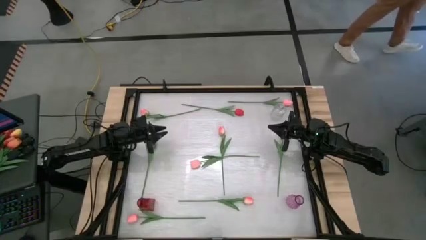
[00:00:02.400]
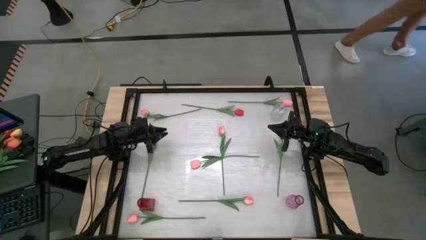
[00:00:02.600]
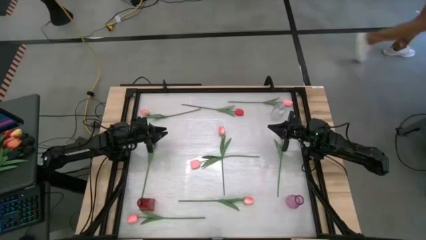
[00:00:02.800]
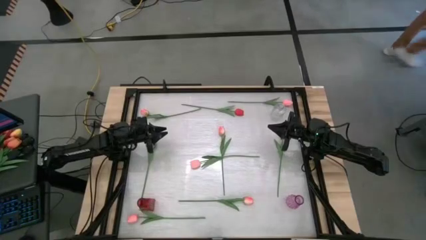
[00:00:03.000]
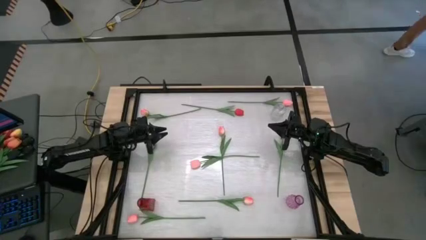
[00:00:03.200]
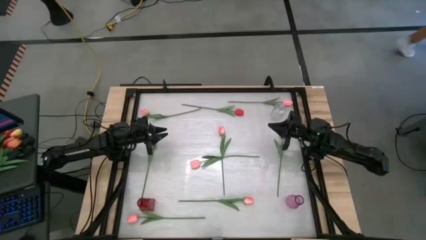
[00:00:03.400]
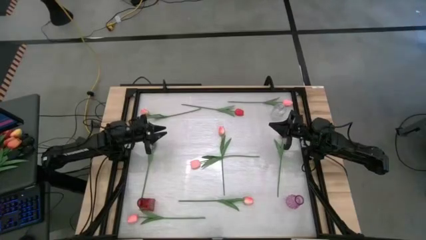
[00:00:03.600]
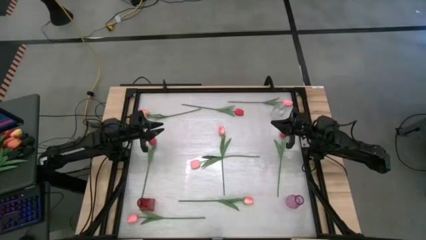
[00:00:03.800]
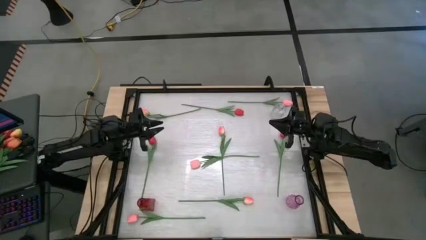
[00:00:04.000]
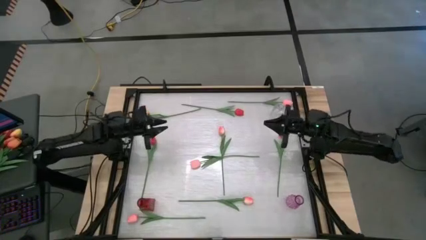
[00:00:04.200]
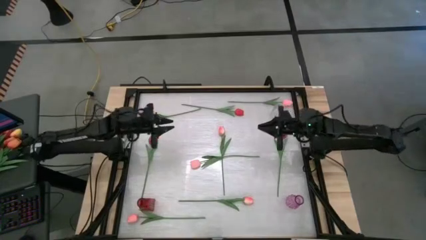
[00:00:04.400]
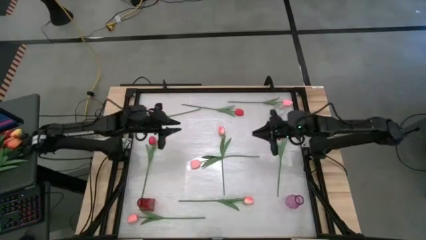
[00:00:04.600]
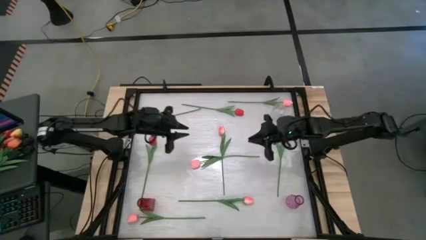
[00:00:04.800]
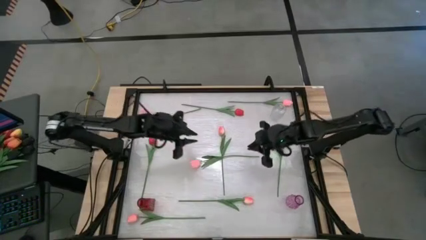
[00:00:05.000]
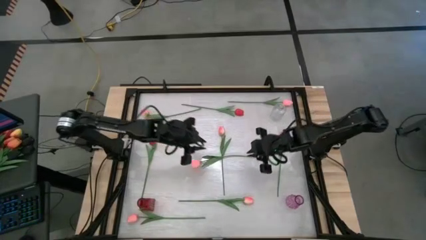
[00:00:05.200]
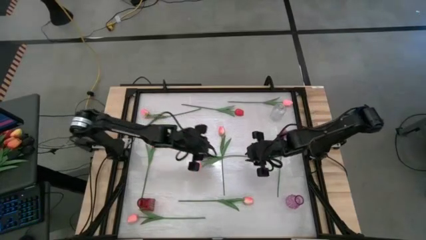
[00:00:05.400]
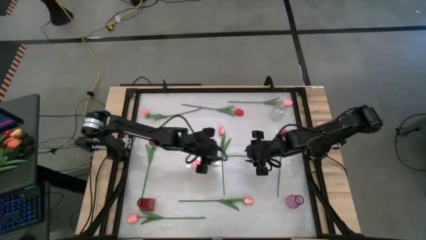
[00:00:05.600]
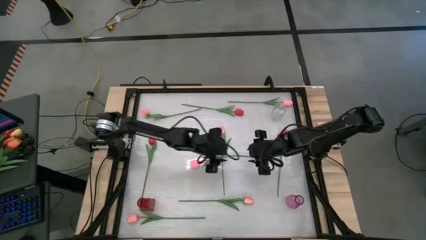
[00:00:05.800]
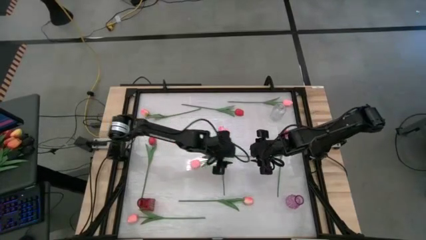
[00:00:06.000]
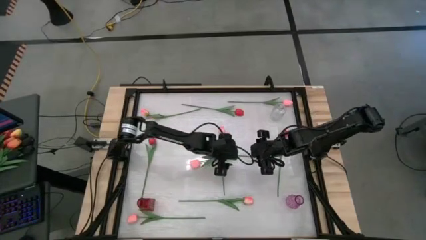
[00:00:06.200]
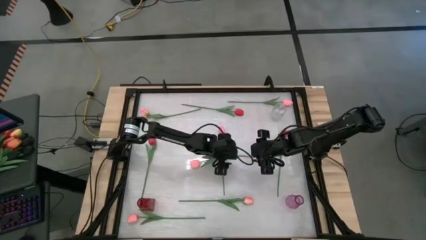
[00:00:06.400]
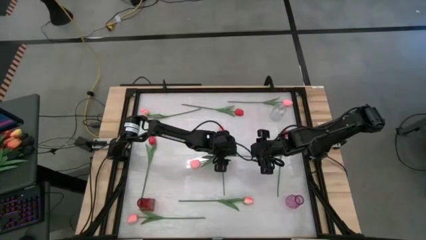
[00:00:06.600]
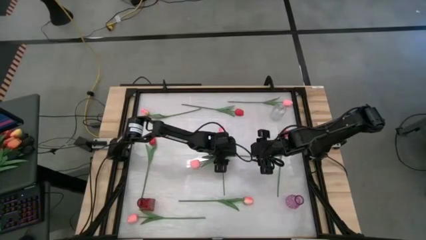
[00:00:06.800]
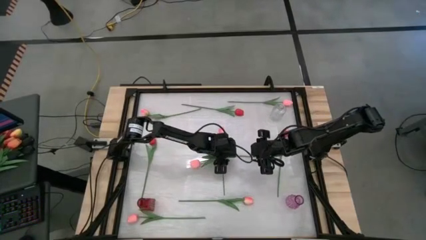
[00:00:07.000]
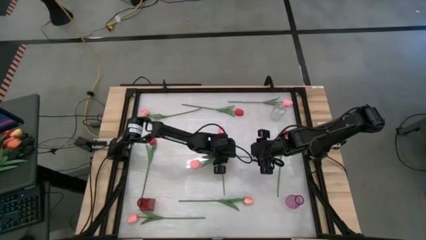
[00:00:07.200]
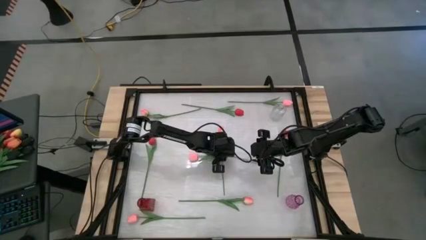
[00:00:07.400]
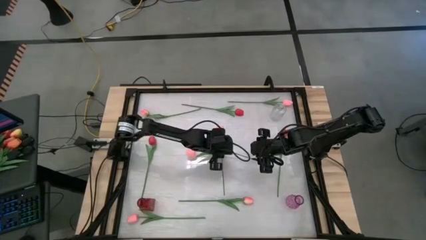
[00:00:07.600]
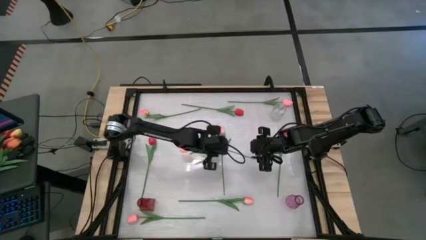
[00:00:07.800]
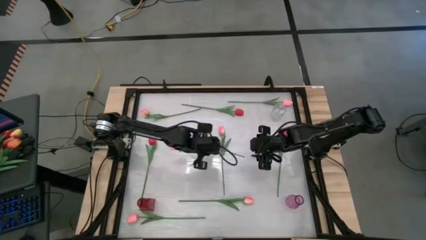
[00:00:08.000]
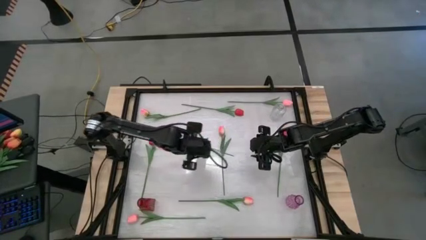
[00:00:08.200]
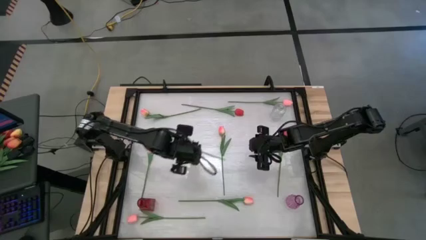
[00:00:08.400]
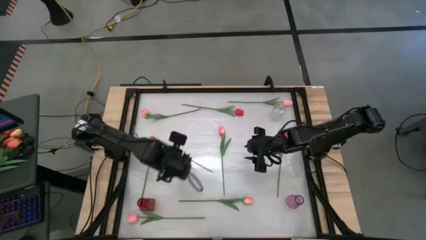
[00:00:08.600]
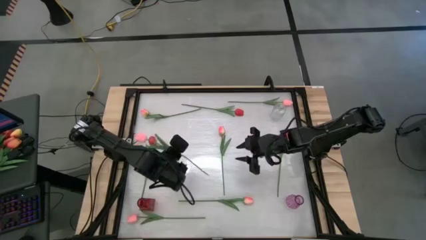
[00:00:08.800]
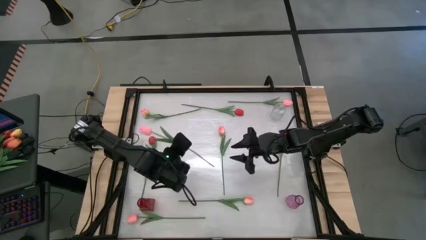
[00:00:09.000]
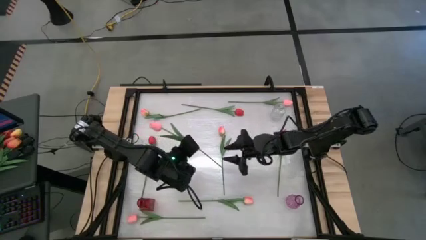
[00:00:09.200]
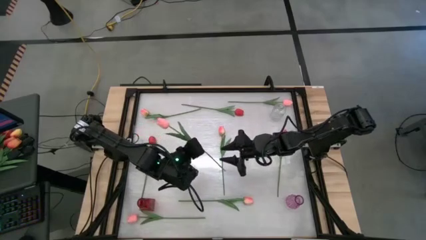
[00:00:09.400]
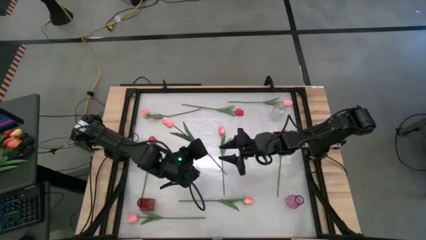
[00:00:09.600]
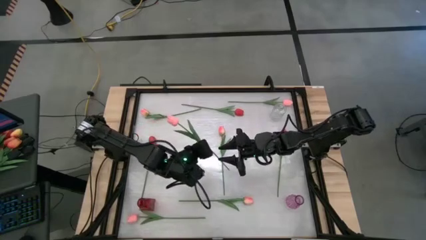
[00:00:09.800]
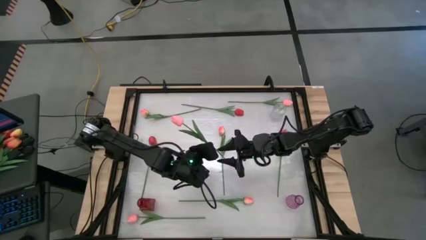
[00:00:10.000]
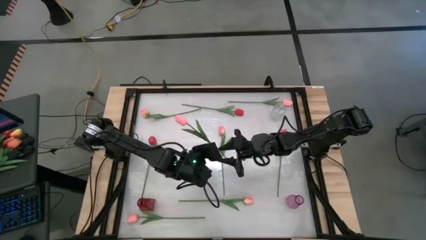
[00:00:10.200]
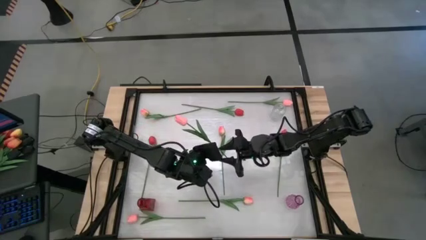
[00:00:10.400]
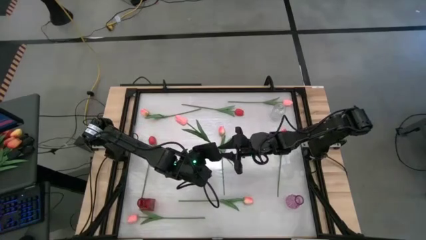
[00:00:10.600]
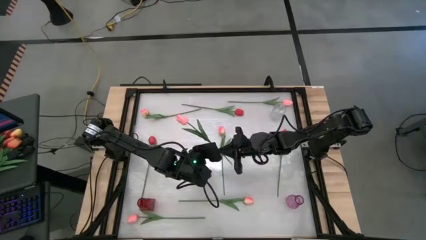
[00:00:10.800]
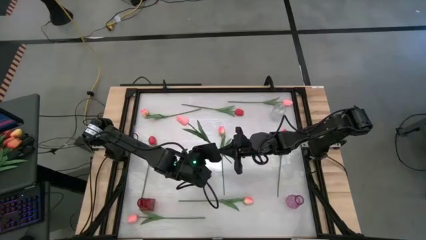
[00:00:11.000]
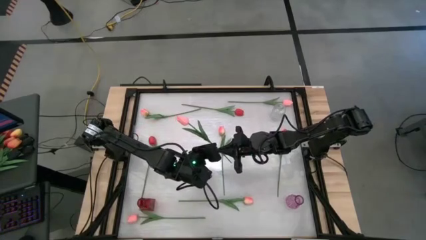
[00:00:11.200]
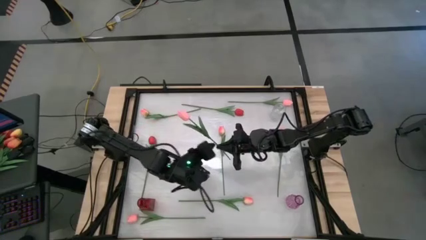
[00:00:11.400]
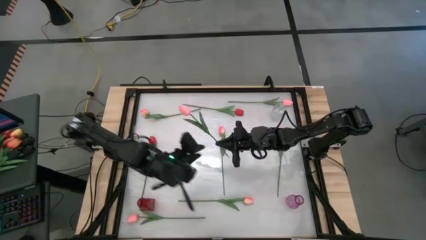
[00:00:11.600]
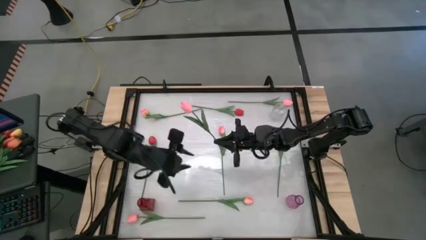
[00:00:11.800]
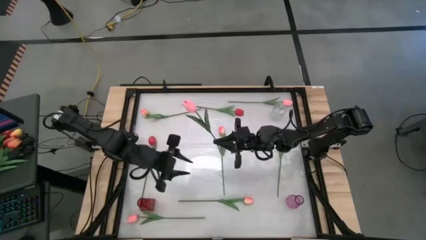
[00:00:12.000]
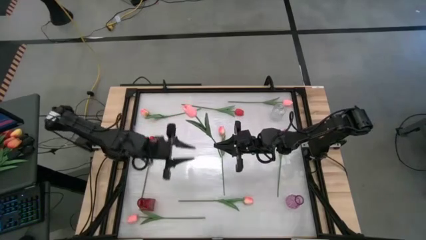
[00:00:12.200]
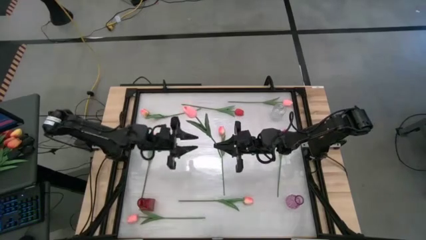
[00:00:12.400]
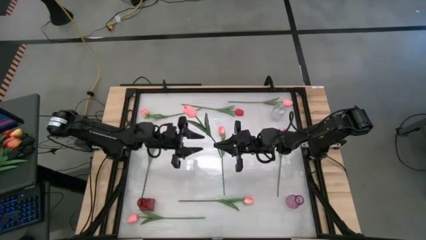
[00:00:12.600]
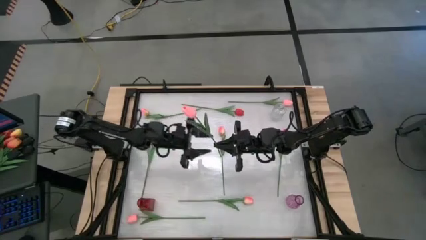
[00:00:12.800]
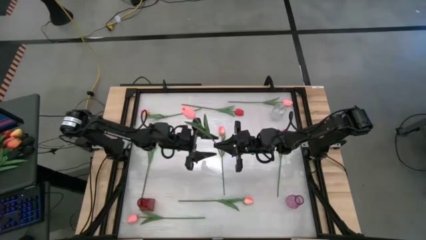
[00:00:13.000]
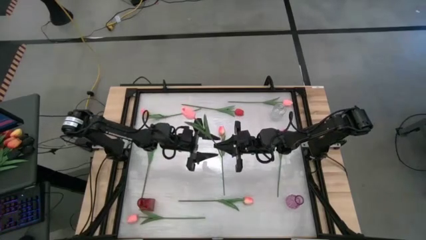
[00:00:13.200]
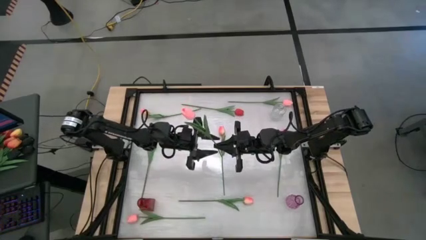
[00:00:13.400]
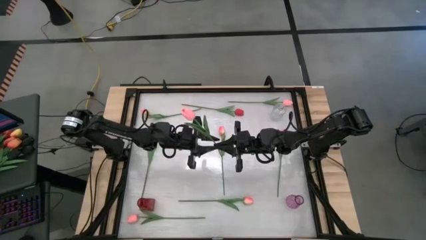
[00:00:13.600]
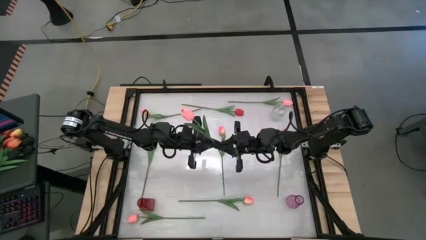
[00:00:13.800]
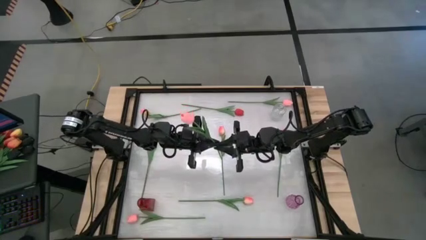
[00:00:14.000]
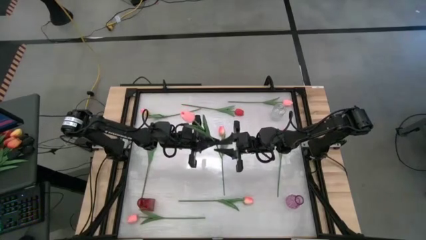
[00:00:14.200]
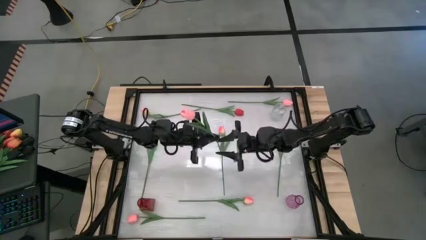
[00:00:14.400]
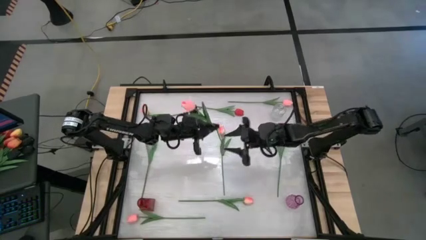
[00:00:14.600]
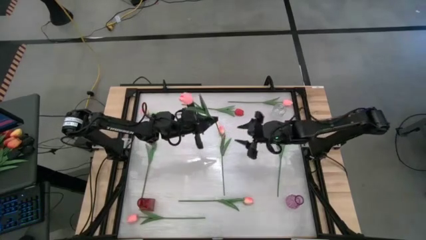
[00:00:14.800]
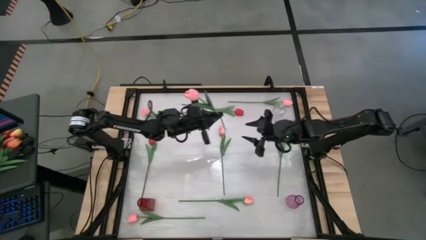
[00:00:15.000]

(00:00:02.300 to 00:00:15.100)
Task: Sort flowers into vase by color
Put the pink flower in the transparent vase
